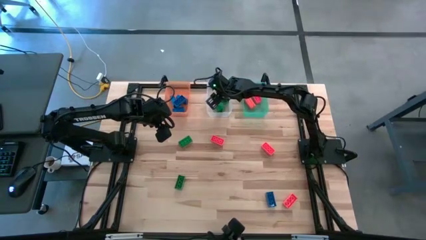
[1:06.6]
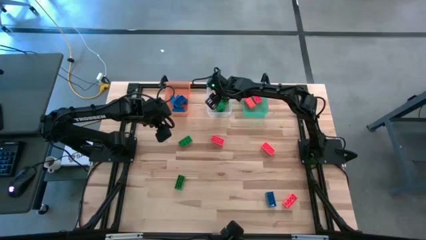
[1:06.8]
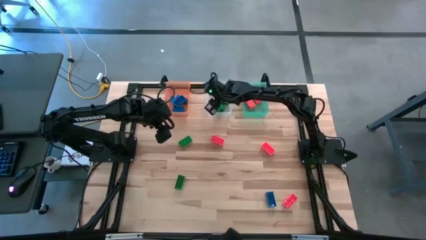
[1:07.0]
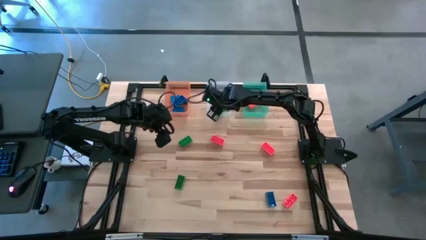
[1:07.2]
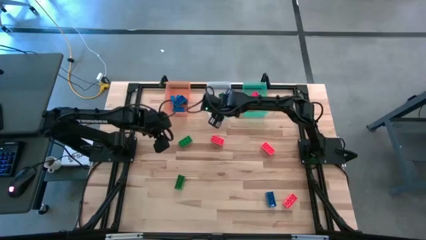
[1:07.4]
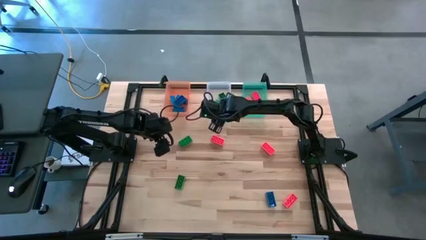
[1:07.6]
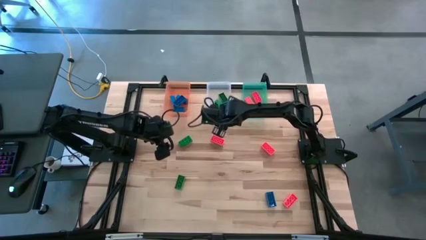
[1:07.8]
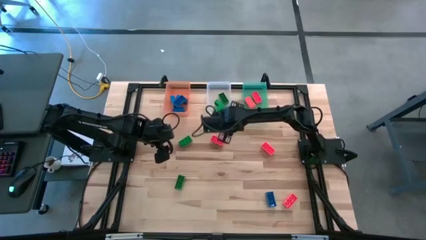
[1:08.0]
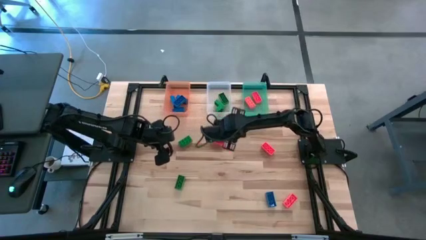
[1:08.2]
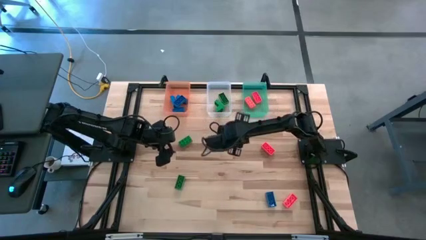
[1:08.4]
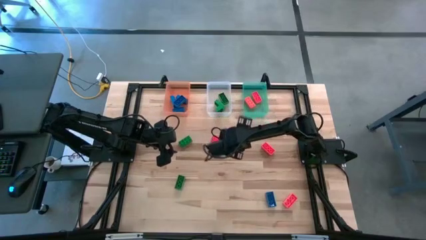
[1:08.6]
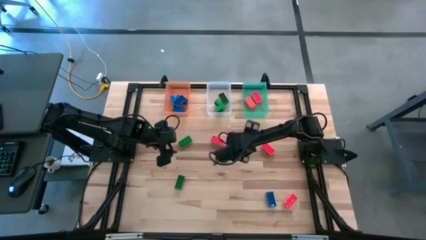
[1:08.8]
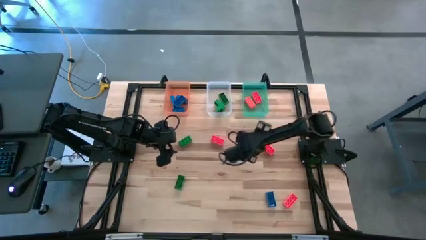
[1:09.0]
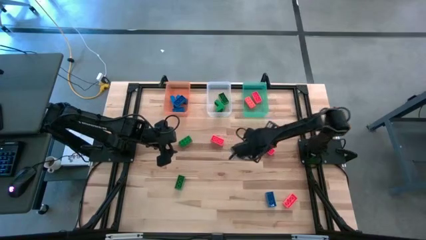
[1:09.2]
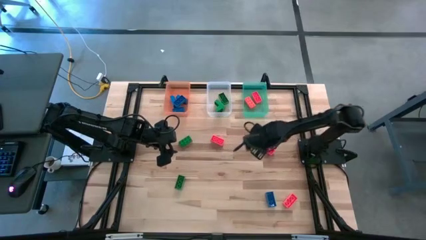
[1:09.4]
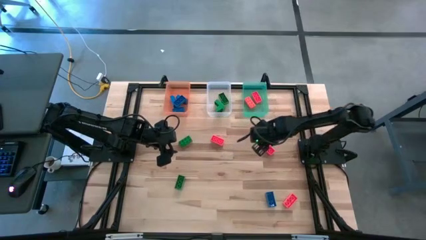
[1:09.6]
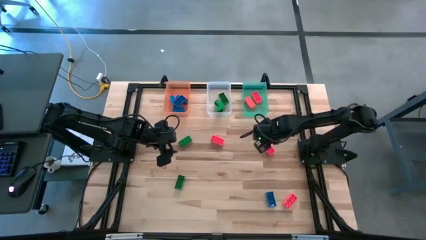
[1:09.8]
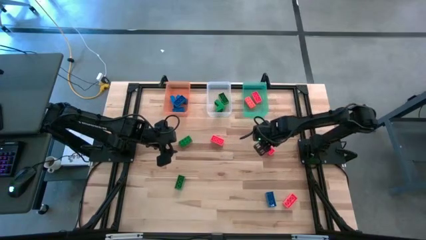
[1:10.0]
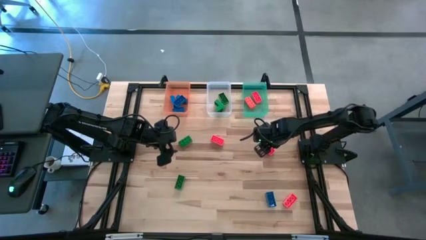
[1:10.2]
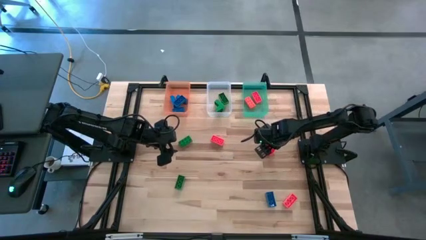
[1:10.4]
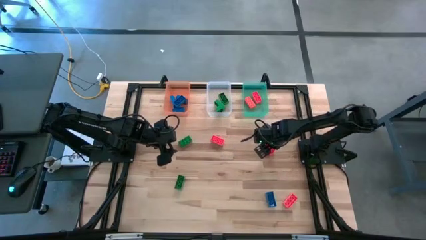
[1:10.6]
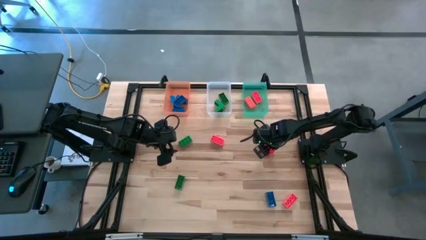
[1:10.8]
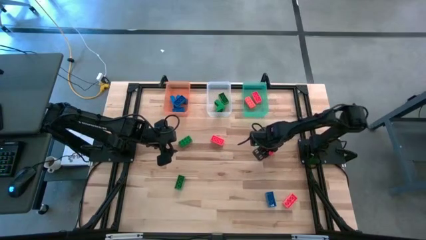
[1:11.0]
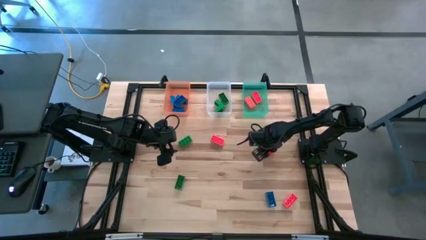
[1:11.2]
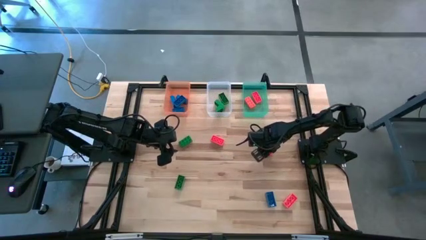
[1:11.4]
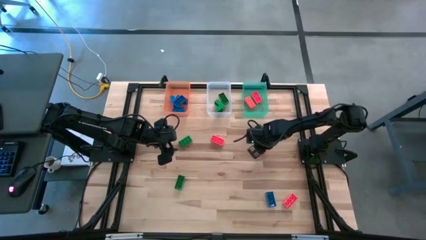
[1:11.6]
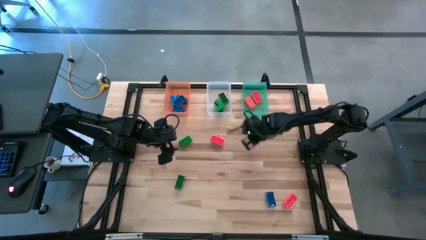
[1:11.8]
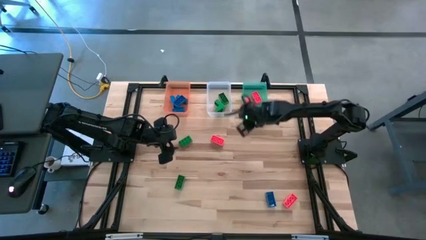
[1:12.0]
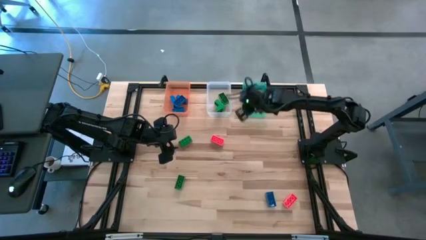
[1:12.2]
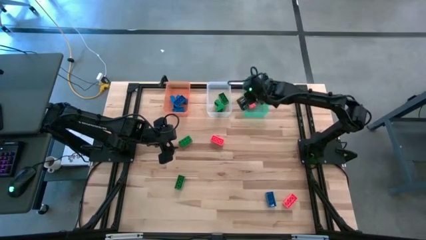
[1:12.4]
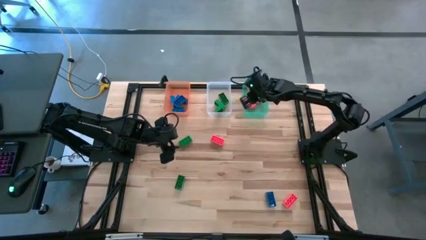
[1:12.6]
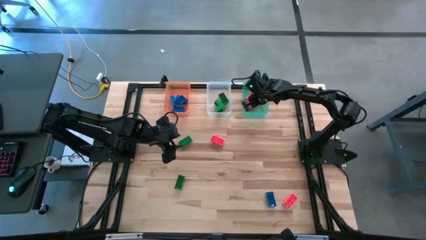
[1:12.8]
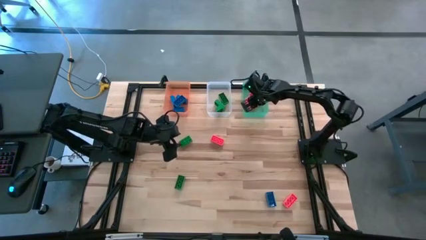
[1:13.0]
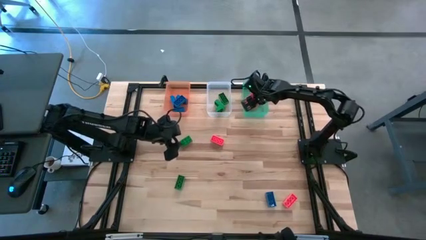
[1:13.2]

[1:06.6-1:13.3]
Task: Sort & place blocks by color
Put the orange game piece into the bin

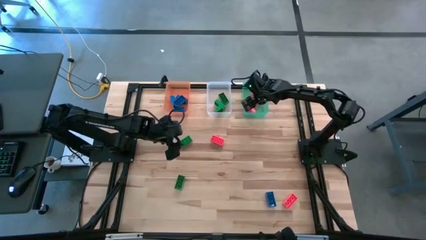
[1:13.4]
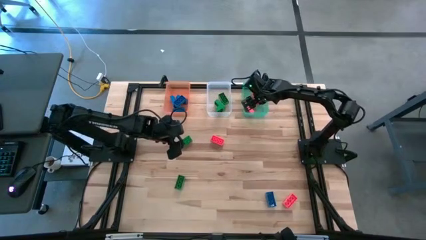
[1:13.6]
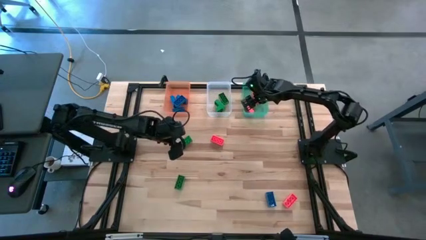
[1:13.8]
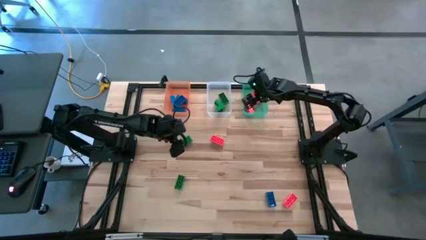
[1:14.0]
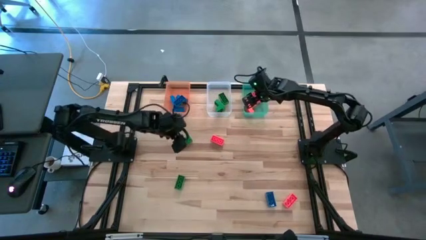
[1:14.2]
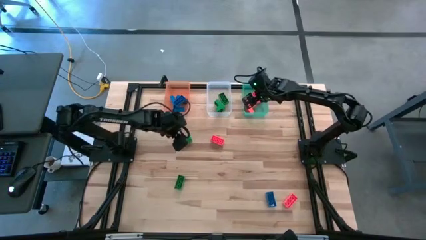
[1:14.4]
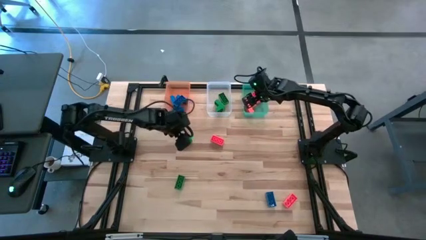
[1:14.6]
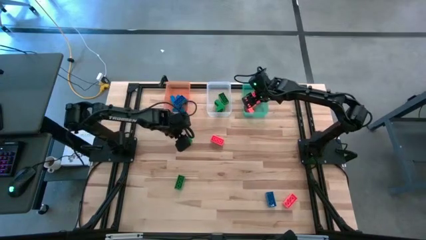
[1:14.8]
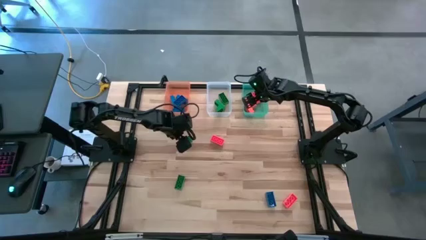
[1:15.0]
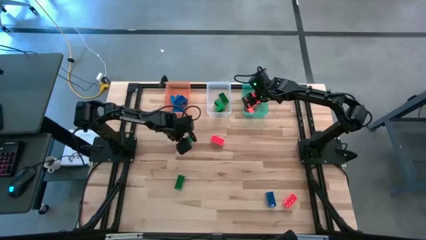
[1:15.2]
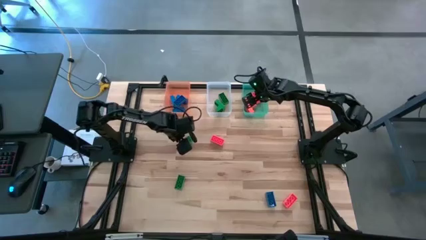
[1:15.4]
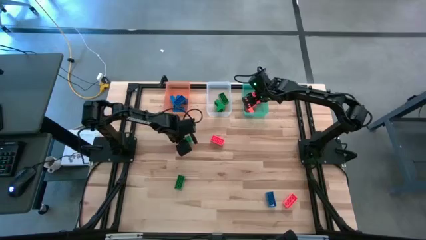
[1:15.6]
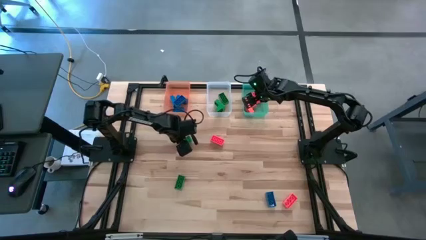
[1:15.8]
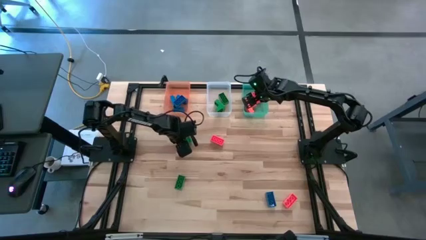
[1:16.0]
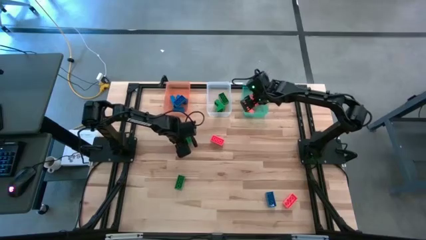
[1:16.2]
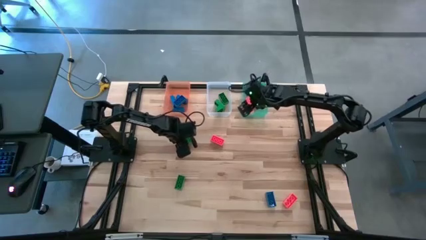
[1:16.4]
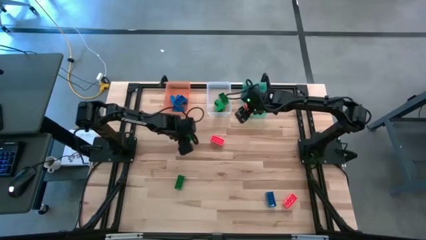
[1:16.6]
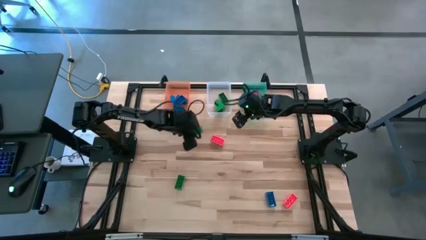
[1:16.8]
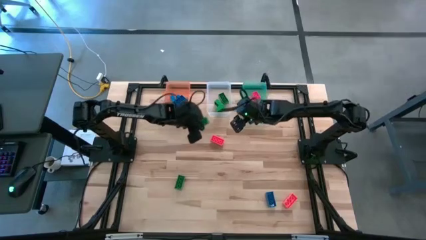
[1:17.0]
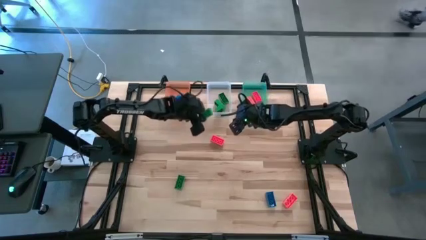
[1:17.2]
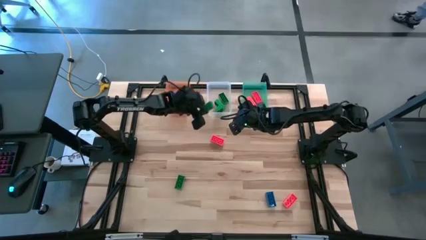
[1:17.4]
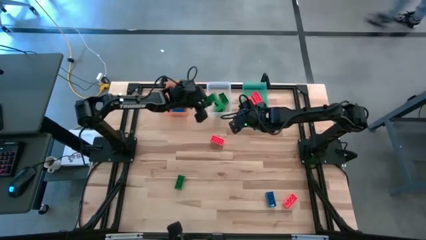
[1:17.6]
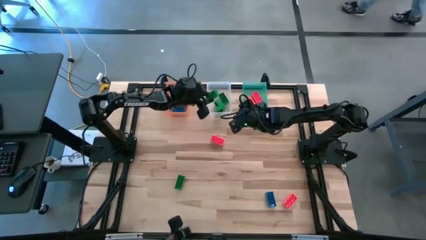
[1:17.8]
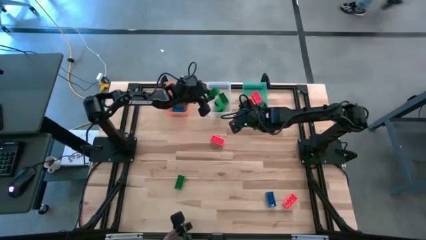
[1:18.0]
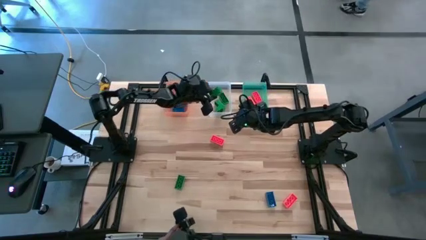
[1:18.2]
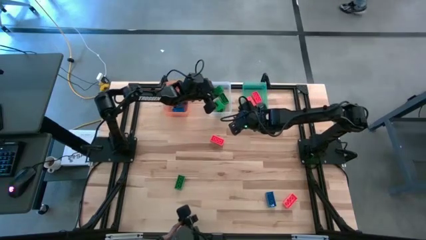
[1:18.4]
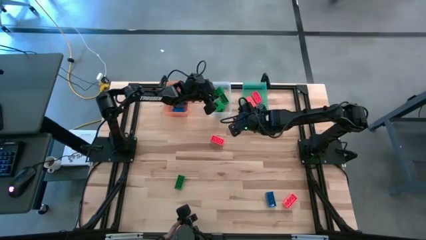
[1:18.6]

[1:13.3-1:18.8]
Put the green game piece into the bin

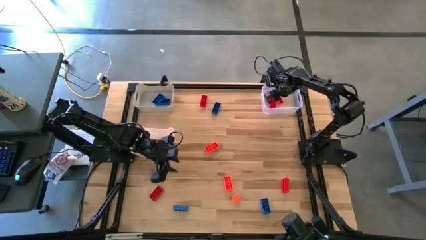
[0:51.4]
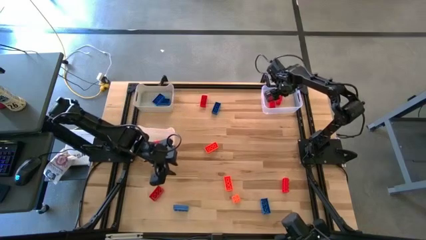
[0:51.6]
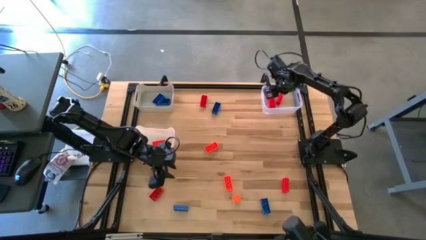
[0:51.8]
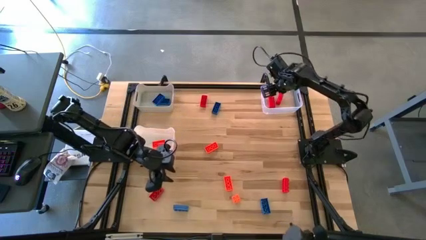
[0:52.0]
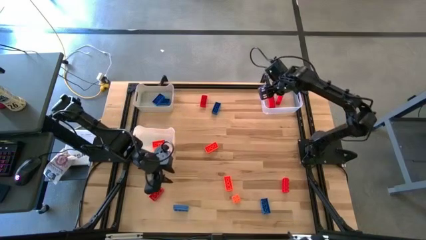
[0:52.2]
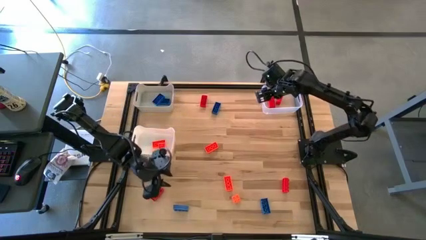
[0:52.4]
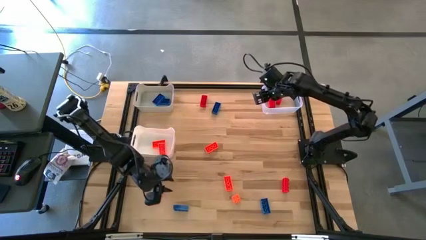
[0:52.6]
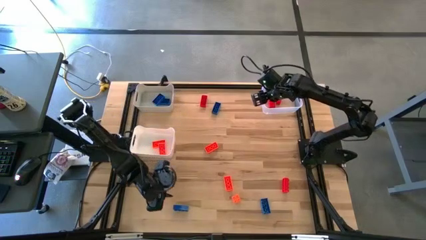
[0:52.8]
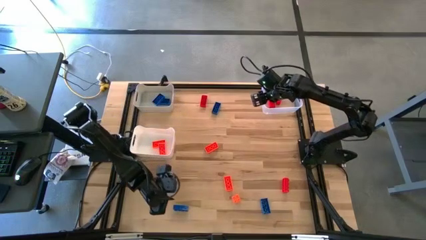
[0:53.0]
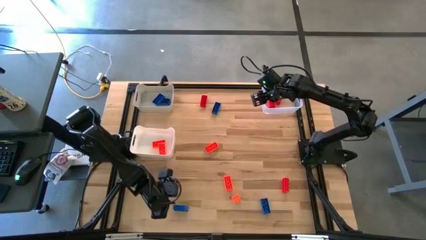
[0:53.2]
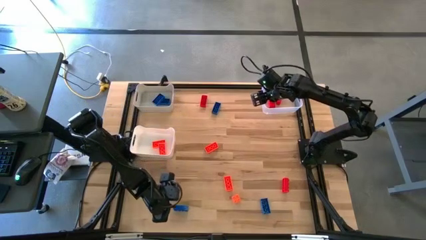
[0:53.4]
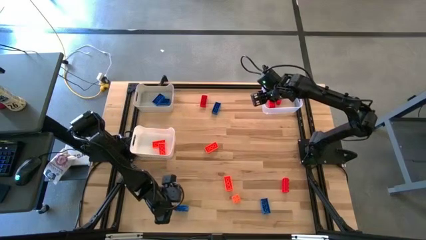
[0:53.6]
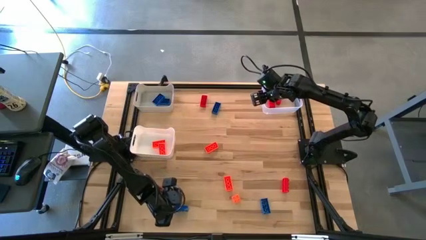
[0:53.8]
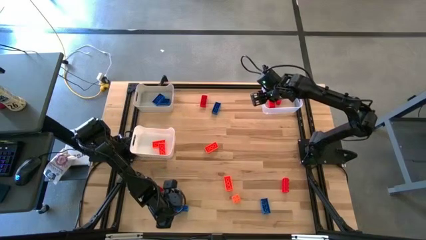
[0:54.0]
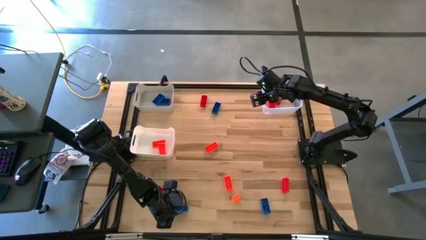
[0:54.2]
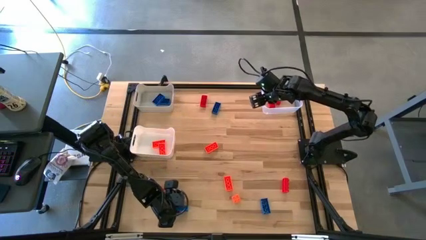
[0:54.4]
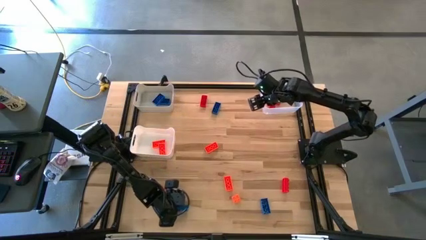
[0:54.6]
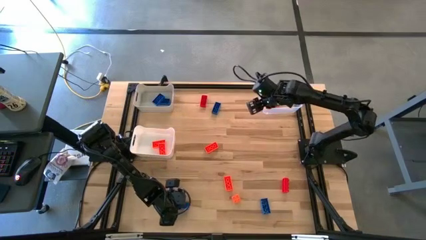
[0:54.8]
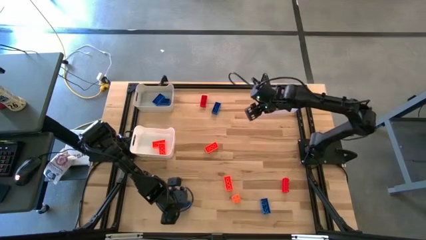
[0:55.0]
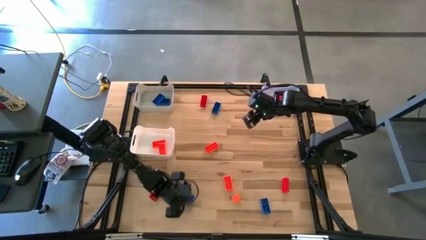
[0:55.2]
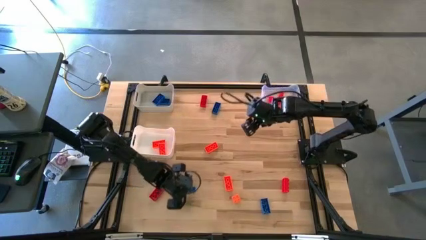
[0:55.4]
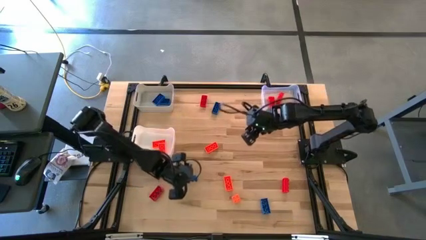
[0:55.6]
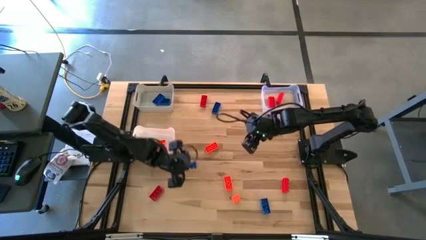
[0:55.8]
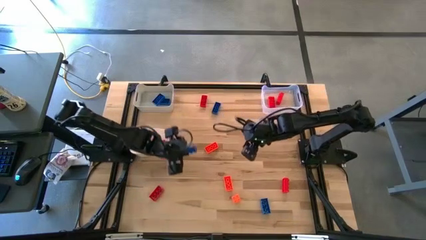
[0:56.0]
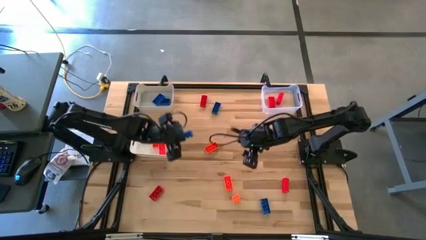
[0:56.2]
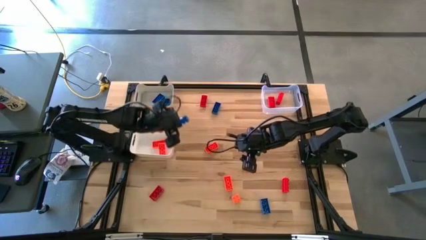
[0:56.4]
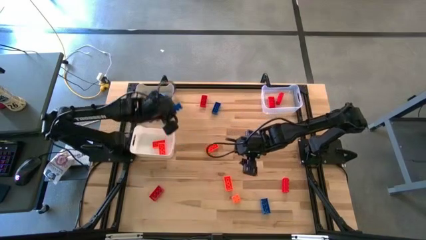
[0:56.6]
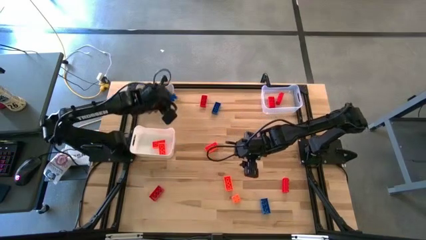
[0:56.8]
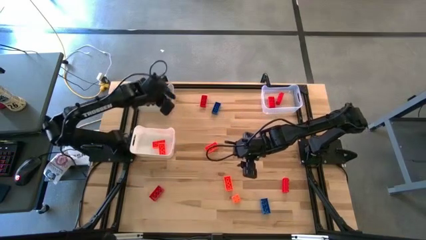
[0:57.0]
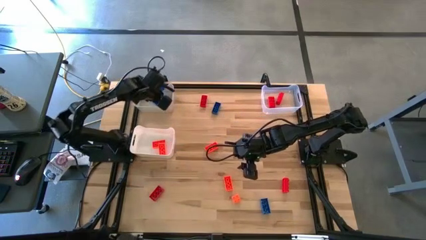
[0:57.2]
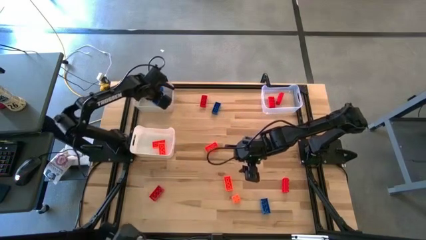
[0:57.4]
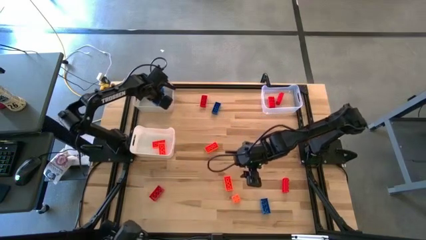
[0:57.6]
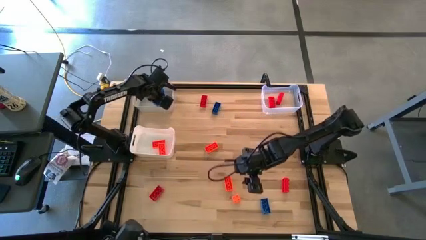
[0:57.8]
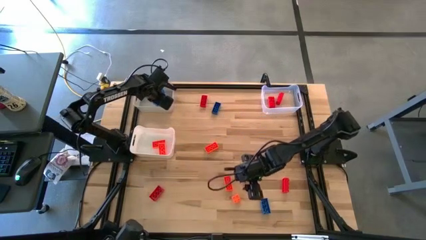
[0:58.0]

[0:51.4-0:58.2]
Task: Sort & place blocks by color
Put the blue game piece into the gray bin
